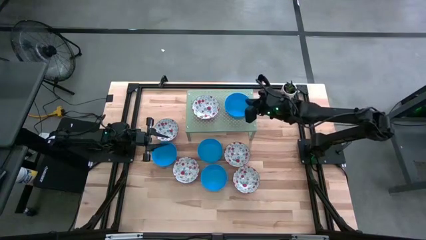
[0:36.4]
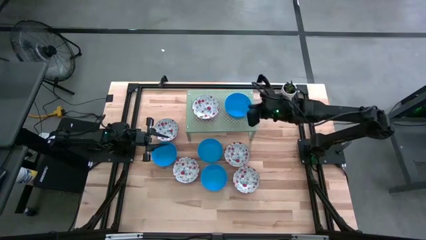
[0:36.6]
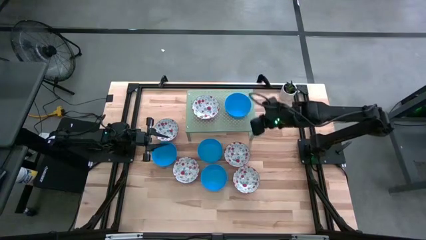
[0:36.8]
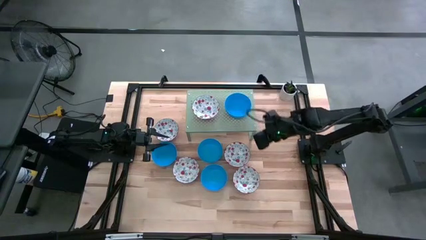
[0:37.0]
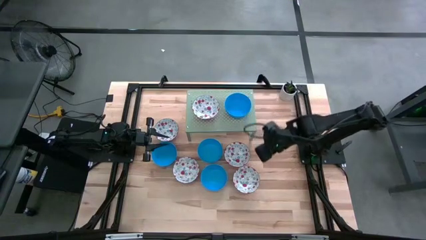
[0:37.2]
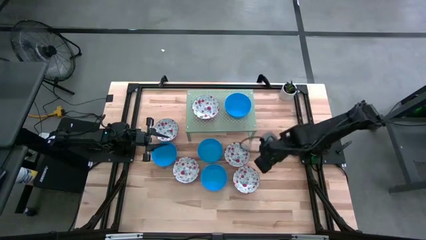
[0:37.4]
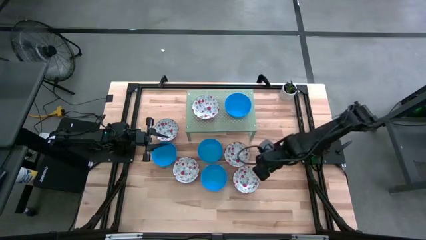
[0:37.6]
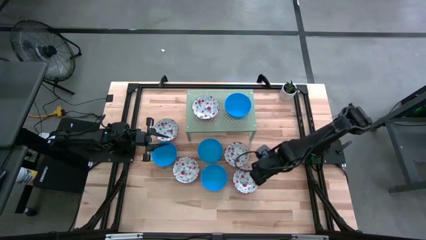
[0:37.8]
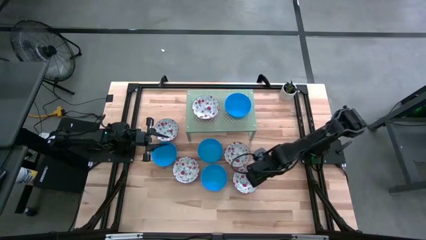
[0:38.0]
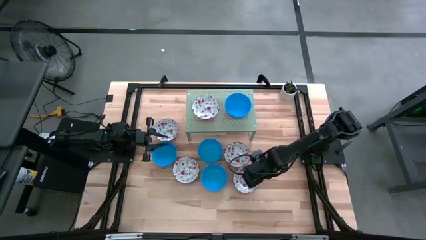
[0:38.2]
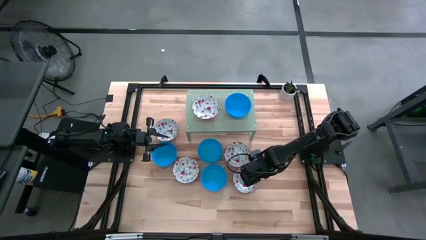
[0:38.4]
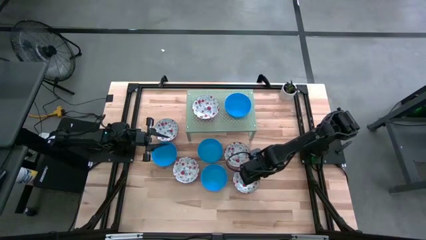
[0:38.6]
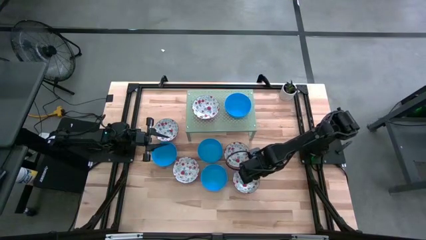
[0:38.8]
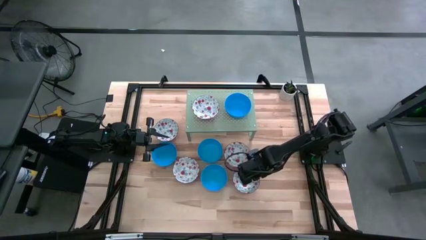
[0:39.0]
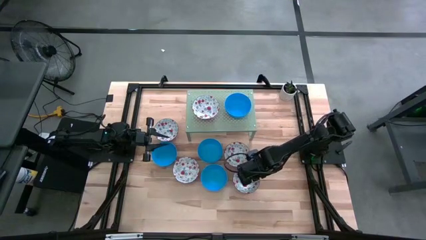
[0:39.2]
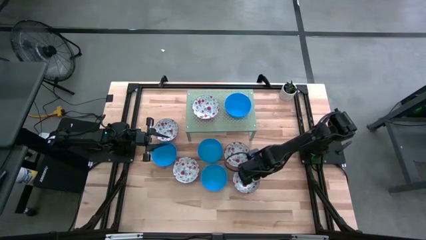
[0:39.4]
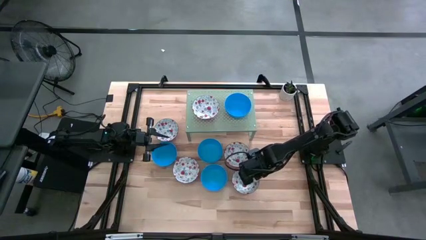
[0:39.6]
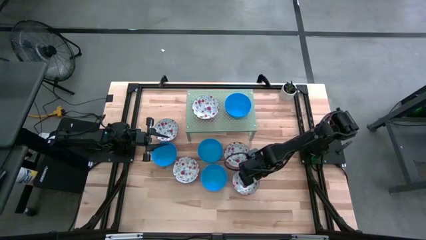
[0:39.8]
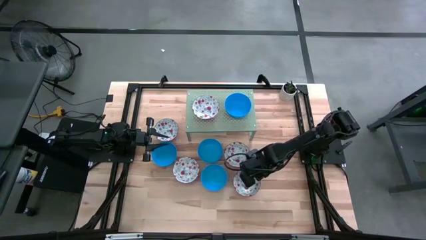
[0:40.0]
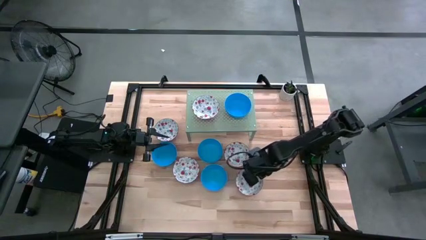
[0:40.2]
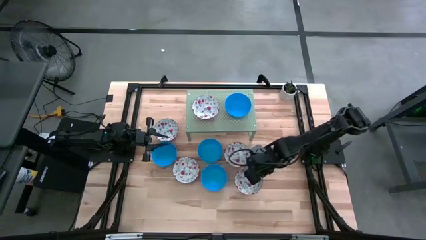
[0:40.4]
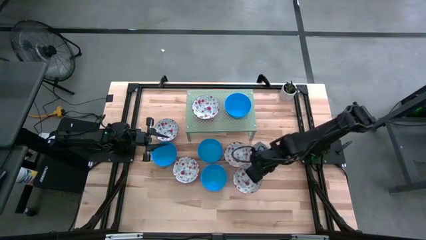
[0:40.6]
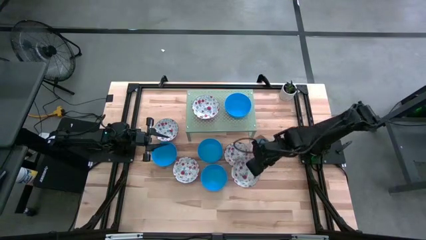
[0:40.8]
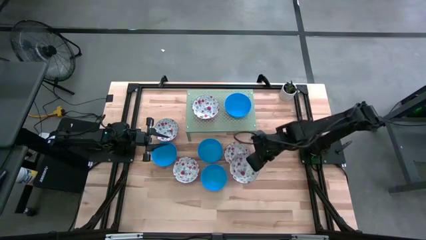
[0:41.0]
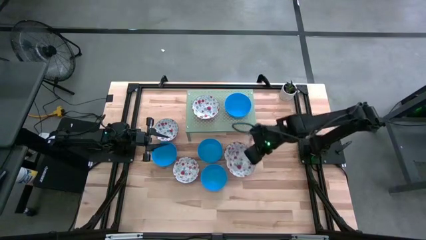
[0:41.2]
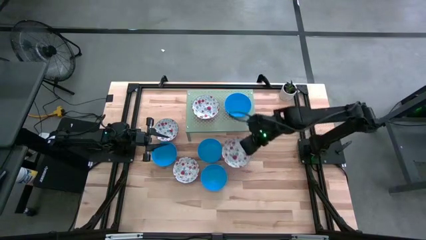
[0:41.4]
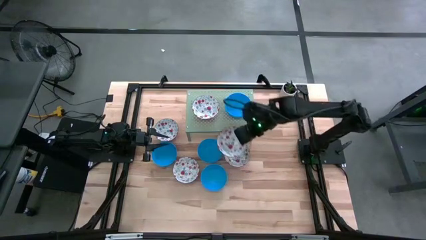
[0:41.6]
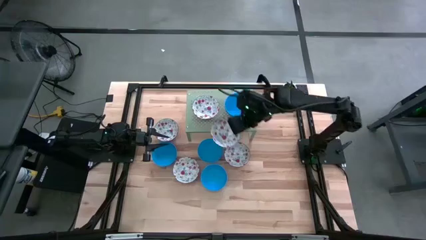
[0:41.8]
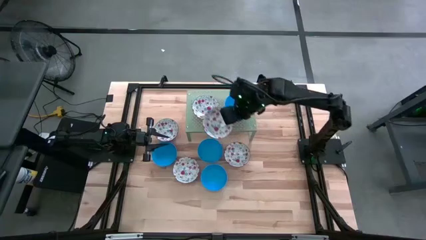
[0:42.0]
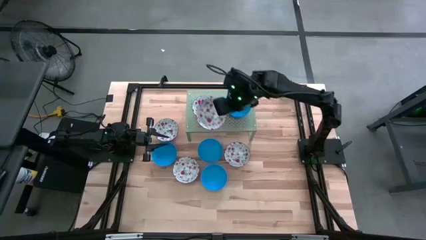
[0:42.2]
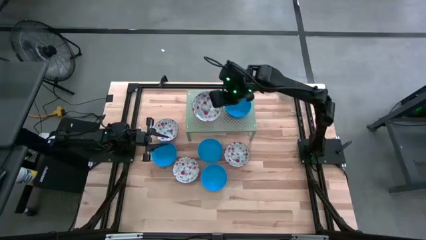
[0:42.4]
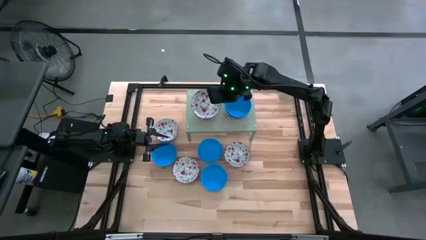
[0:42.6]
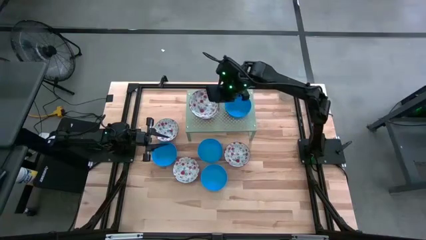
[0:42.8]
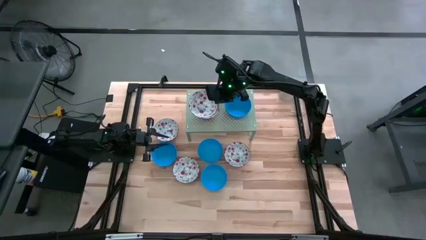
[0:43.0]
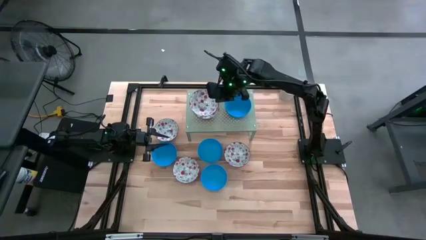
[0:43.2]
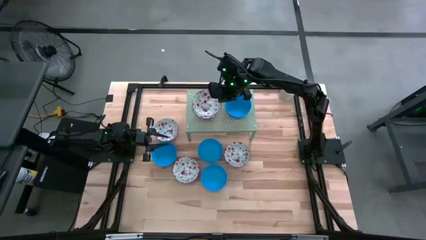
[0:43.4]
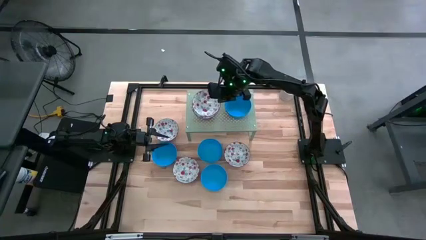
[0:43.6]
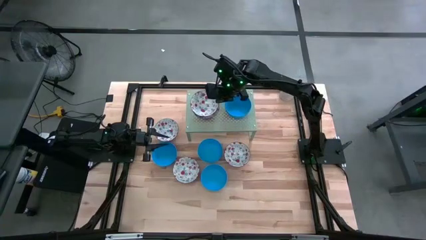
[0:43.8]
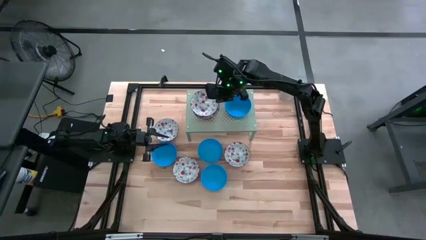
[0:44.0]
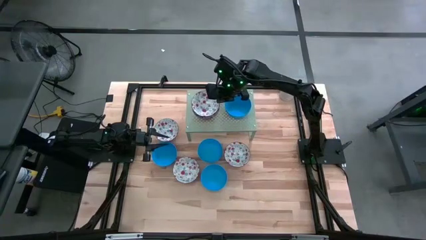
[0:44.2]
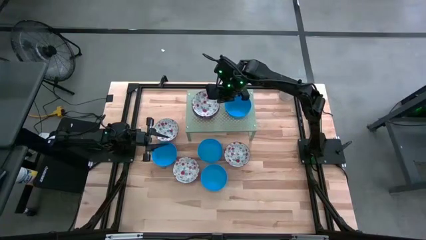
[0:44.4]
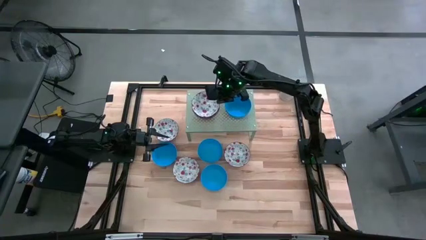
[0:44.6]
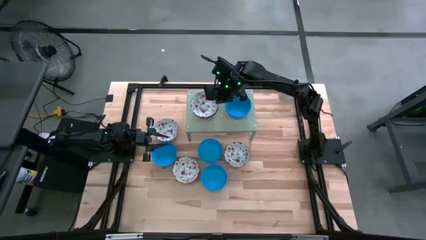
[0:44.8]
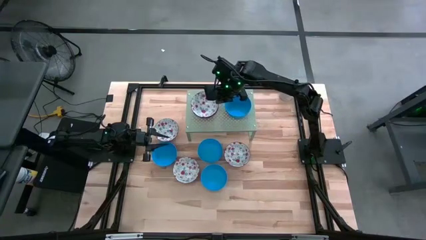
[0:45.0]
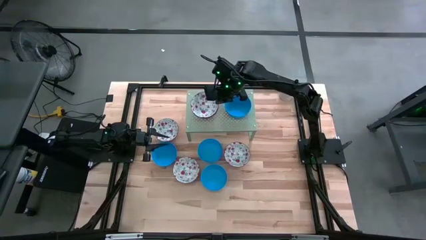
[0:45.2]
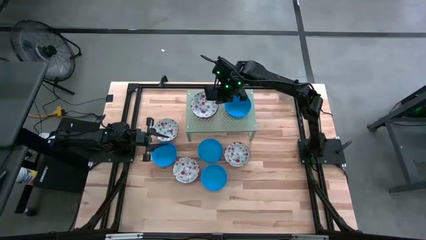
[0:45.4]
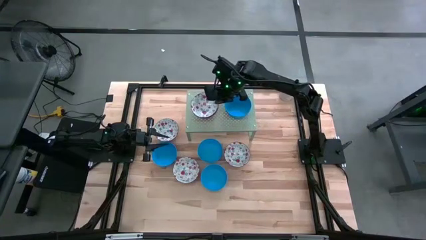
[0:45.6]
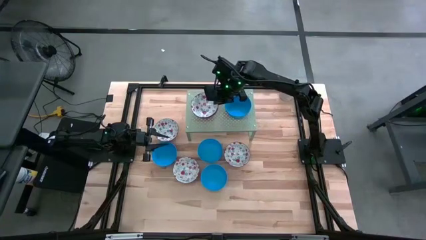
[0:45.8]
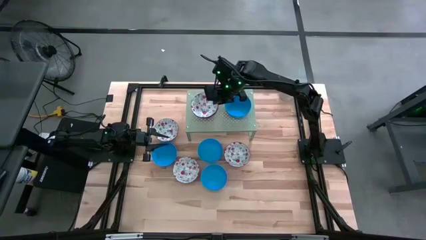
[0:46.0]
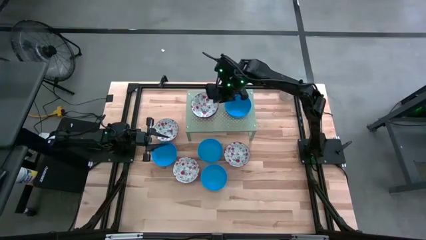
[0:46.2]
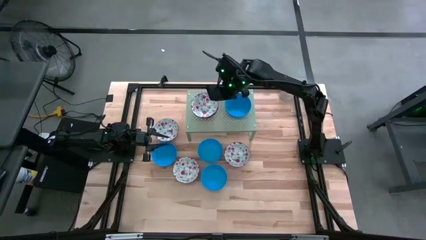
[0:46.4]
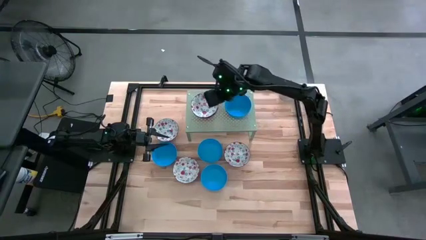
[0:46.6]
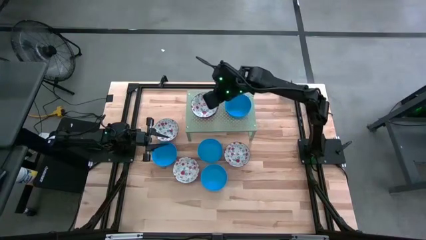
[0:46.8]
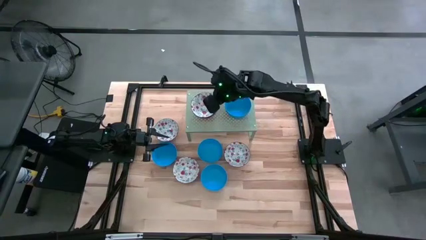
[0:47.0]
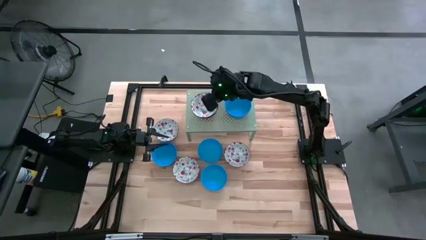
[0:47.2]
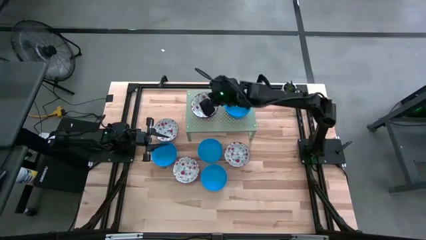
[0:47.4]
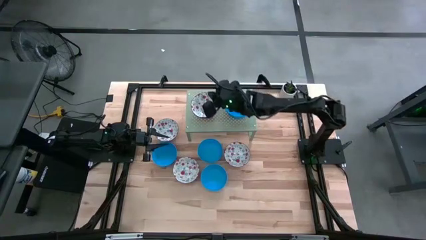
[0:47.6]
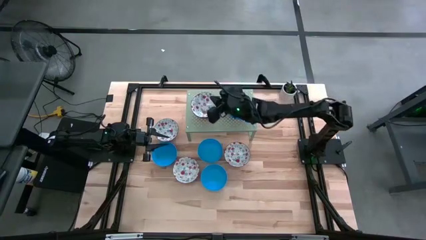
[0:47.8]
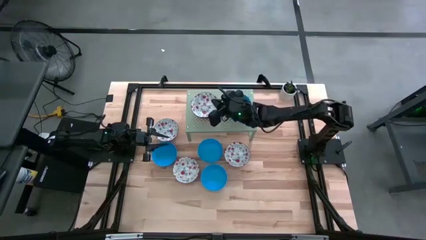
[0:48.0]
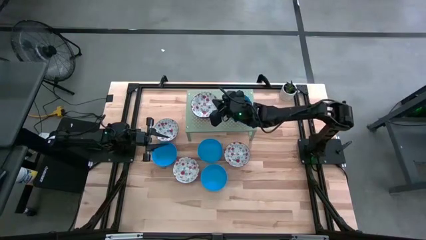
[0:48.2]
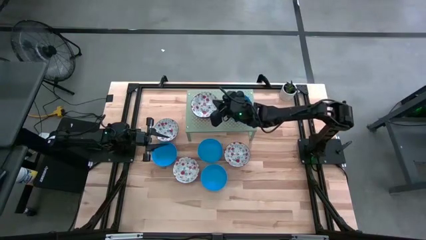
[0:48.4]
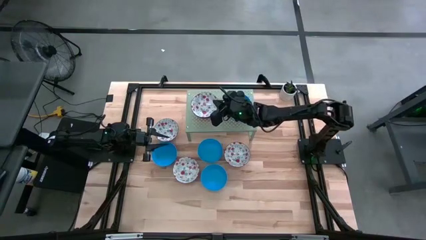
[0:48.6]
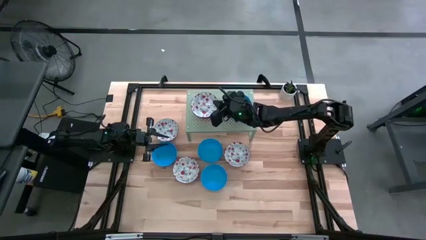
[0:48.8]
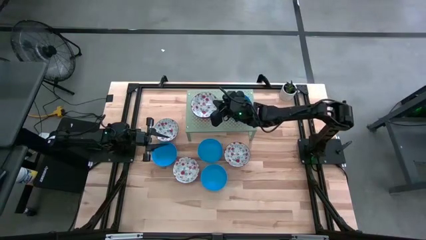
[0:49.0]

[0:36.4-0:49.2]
Task: Pick & Place Mini bowls
Stack the red patterned bowl on the red patterned bowl on the shelf
